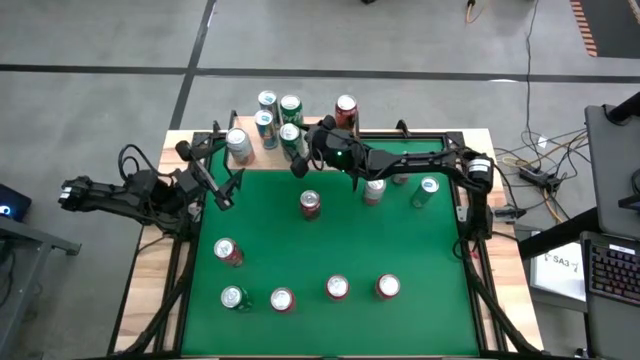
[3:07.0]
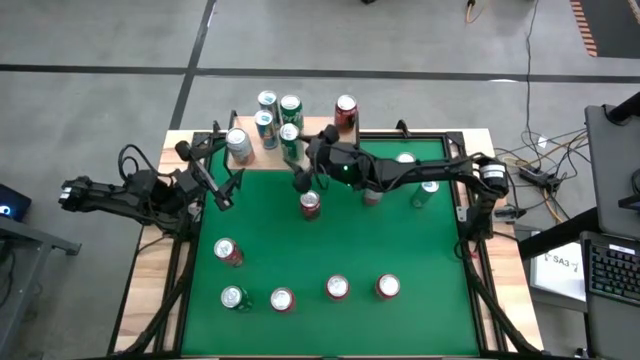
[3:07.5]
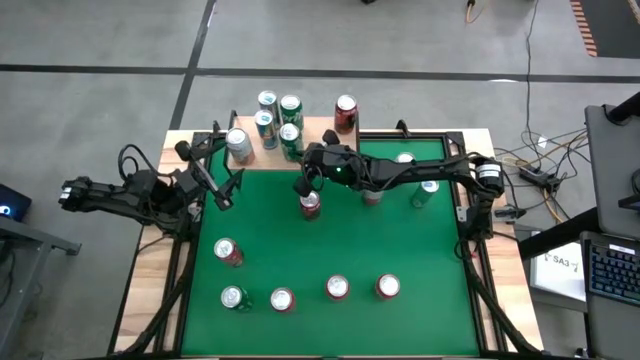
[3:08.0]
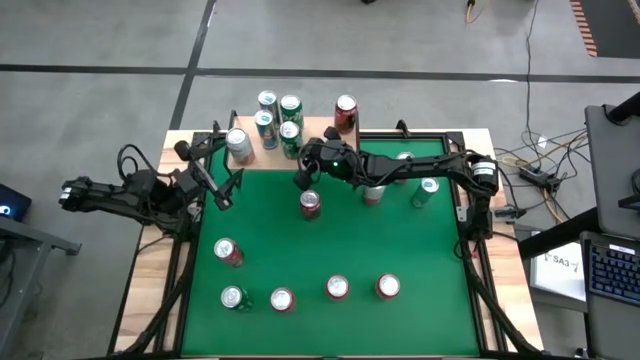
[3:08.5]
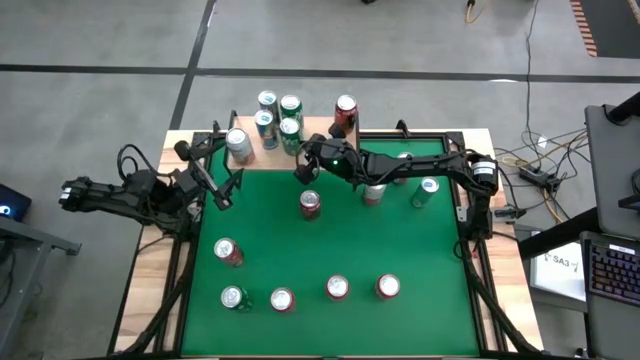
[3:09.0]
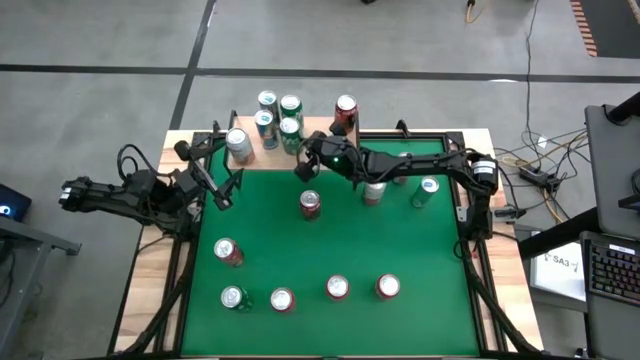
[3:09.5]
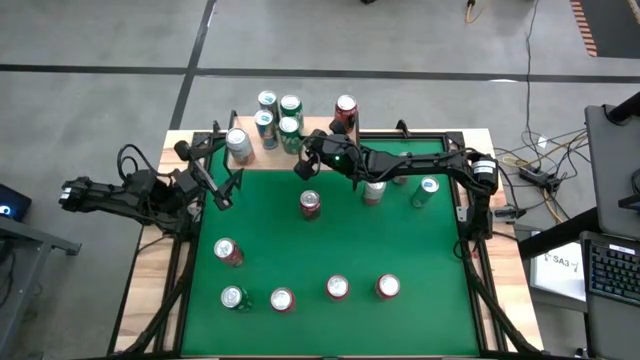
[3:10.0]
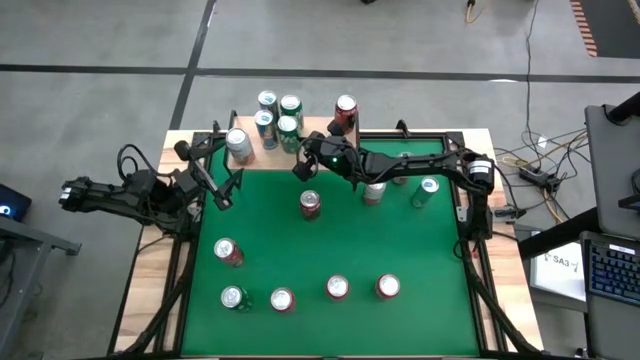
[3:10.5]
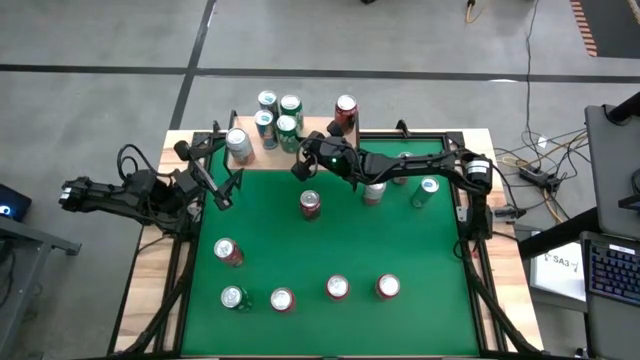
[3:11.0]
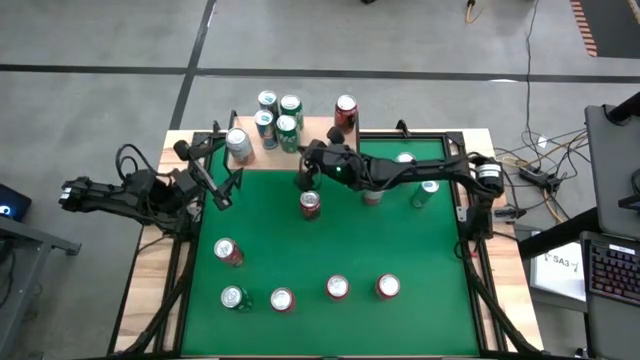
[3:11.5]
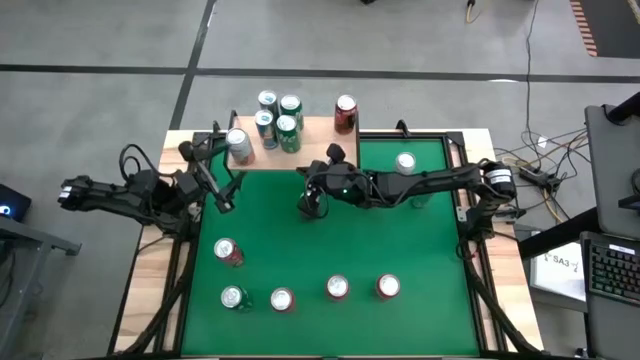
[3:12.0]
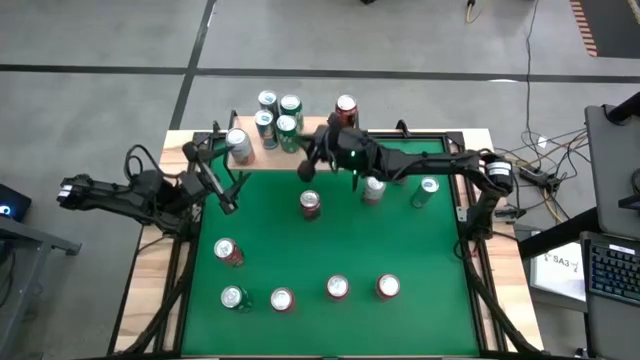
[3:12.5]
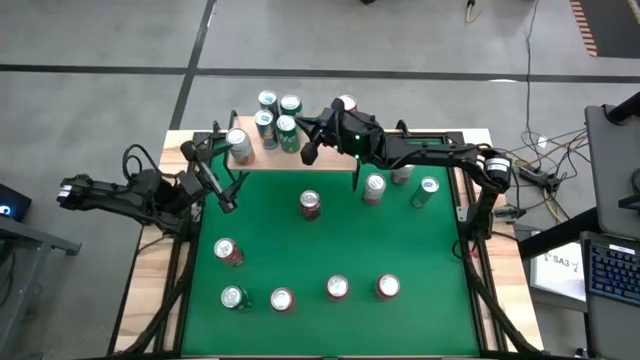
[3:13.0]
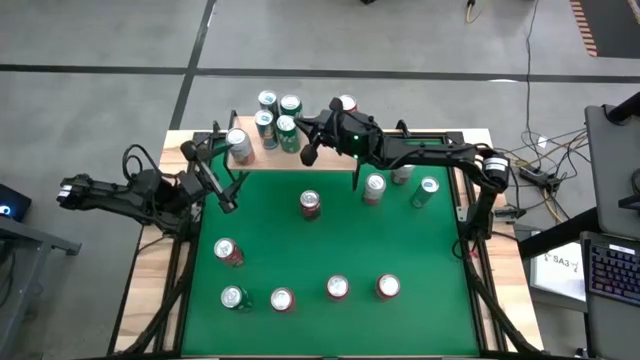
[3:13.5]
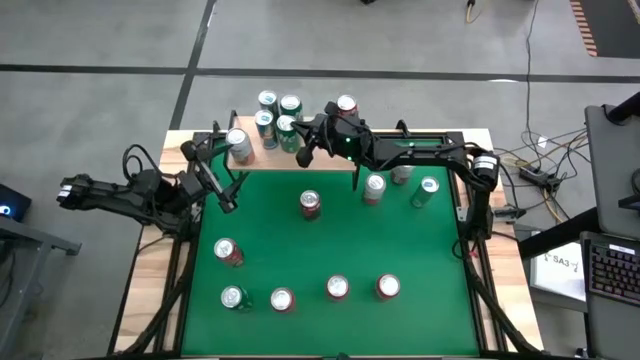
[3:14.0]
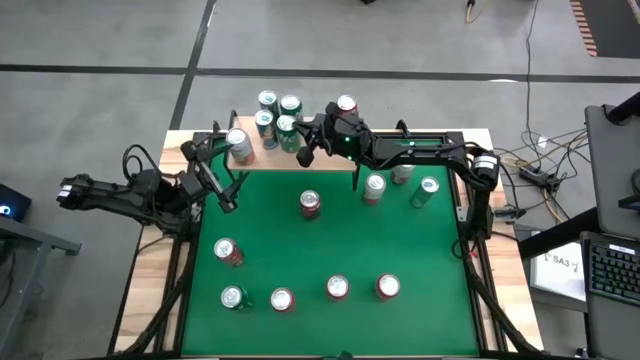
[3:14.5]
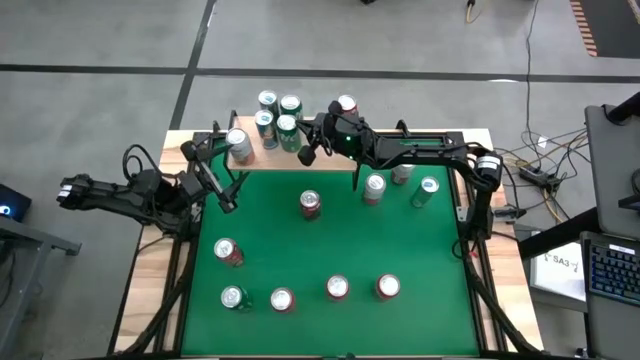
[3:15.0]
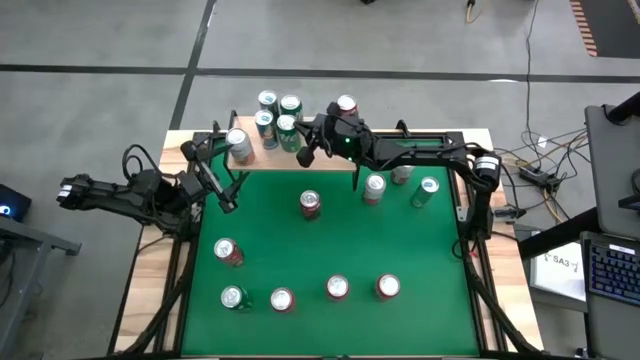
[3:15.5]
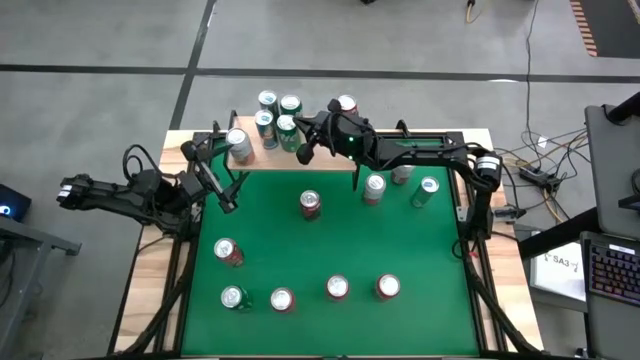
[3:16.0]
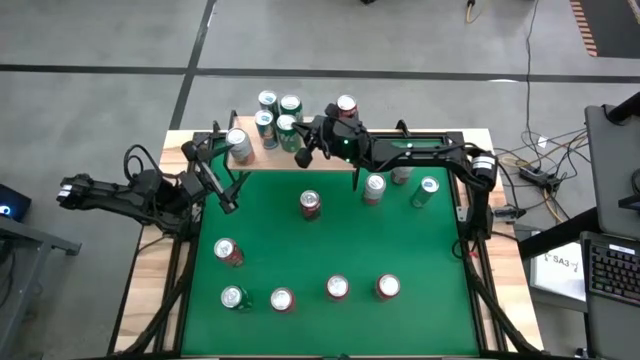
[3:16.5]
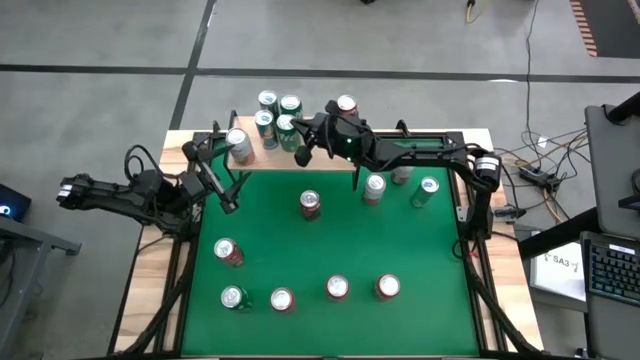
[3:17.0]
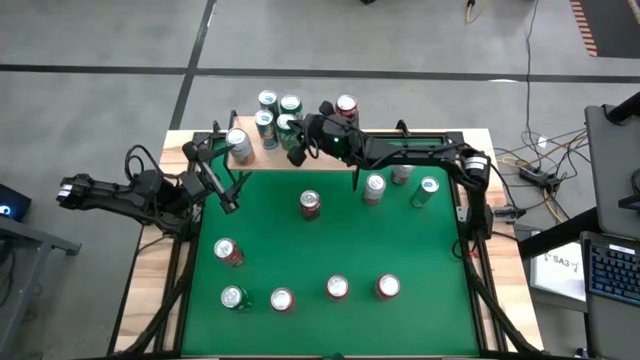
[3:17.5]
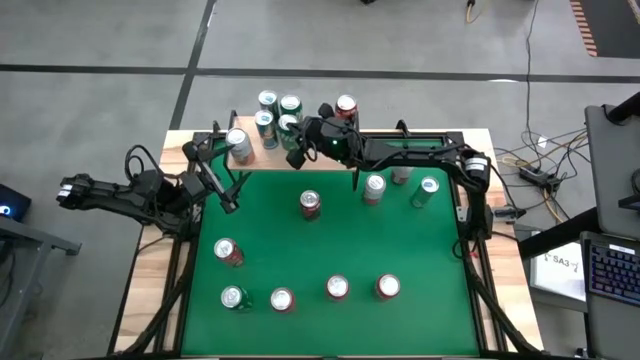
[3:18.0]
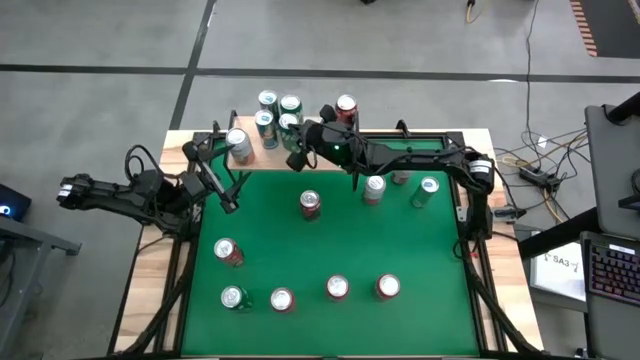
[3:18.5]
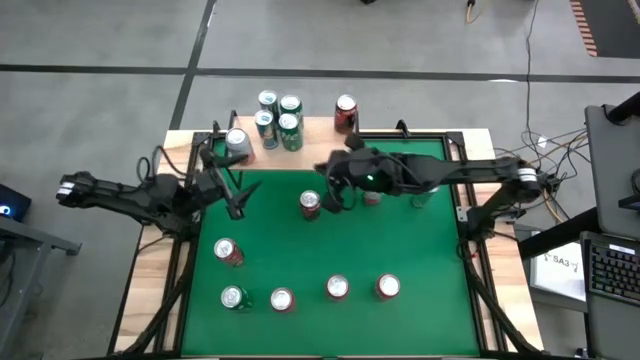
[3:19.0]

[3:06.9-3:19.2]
Task: Place canned beverage on shelf
Put the white and red can on the shelf

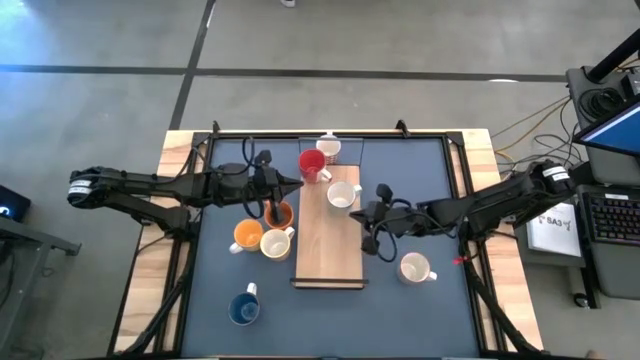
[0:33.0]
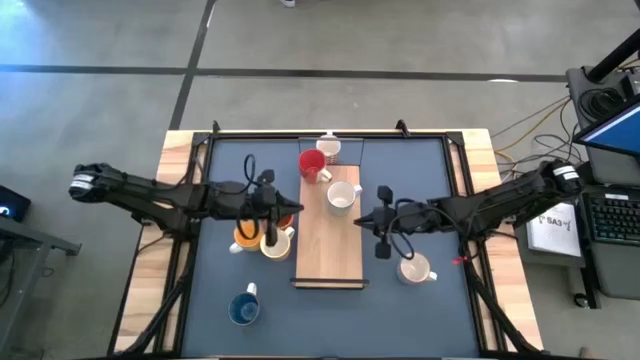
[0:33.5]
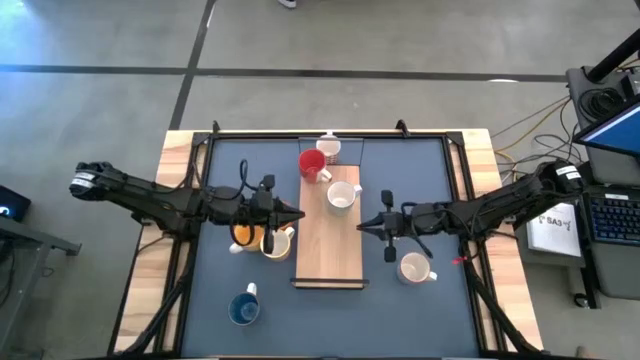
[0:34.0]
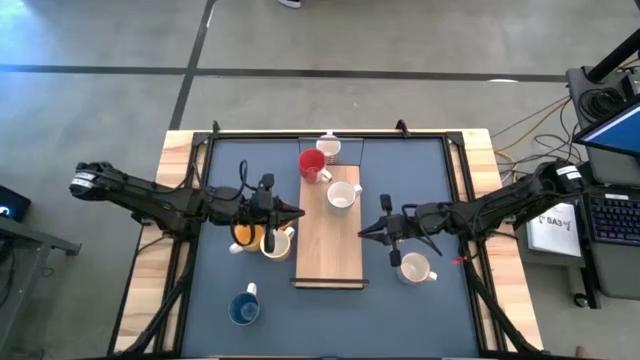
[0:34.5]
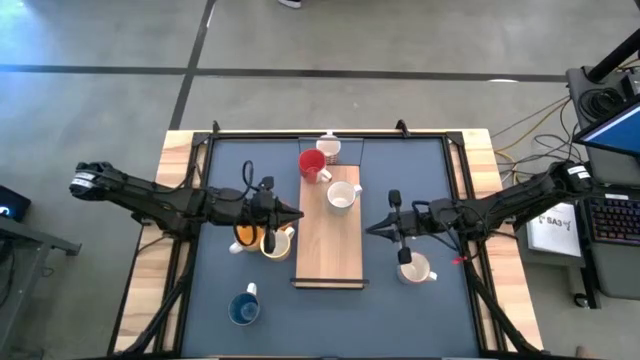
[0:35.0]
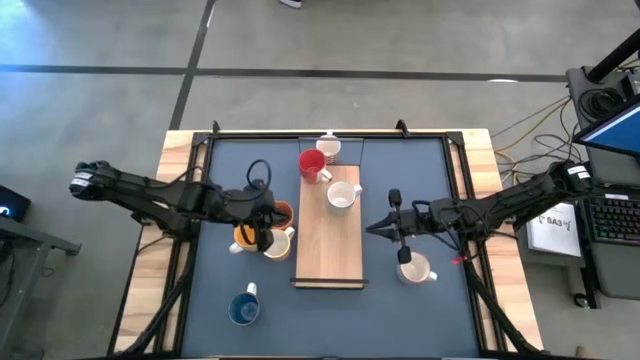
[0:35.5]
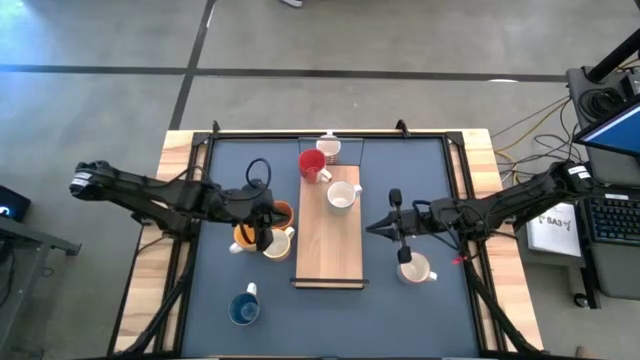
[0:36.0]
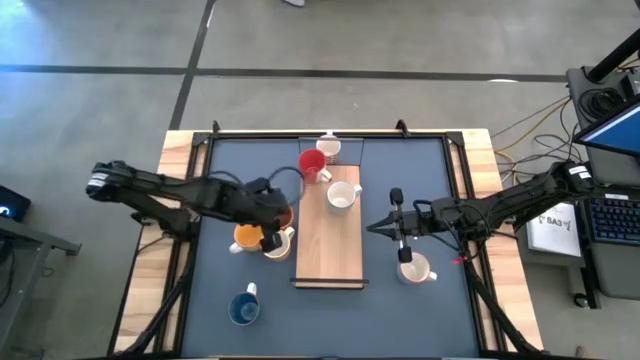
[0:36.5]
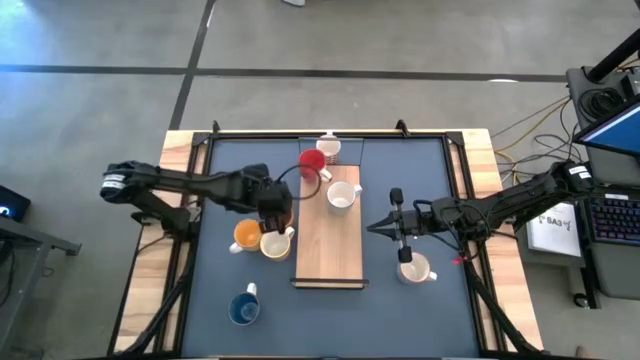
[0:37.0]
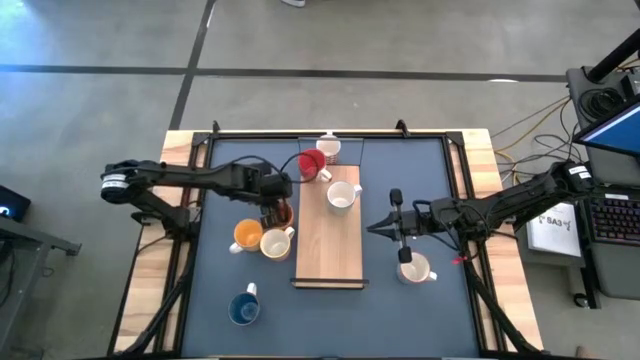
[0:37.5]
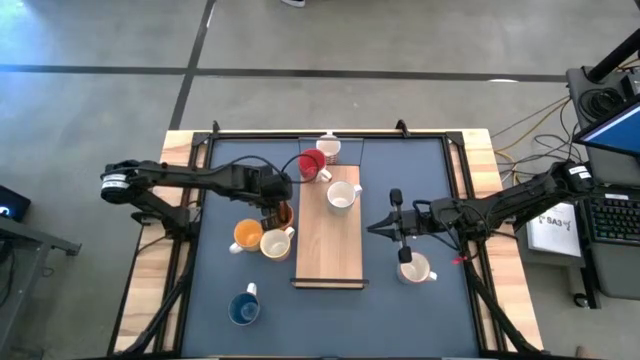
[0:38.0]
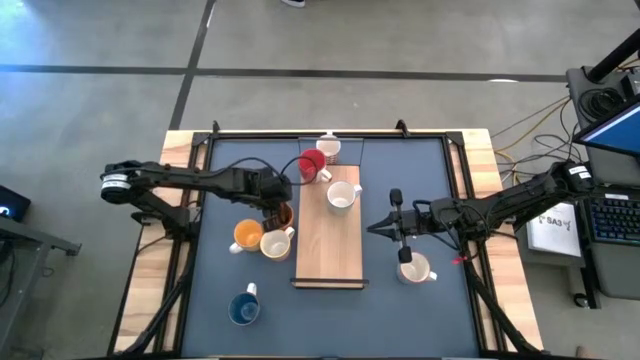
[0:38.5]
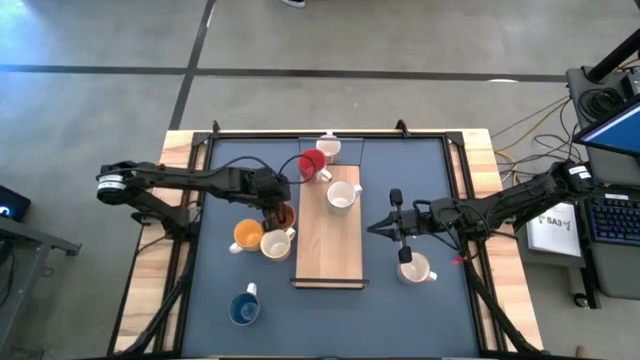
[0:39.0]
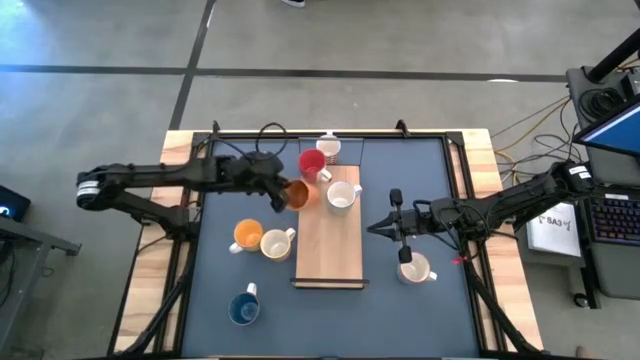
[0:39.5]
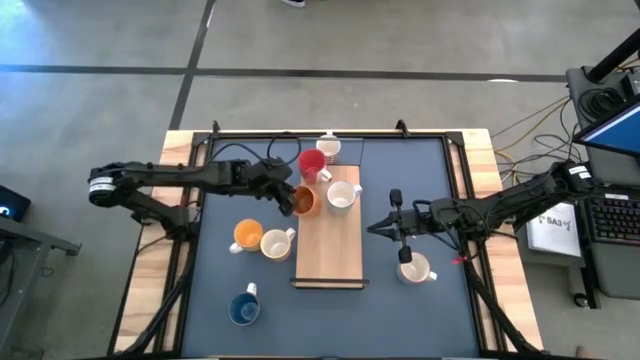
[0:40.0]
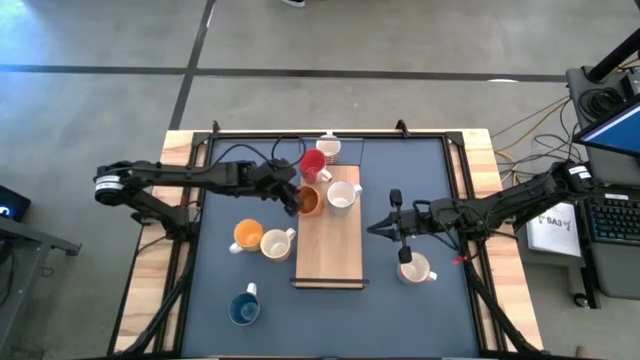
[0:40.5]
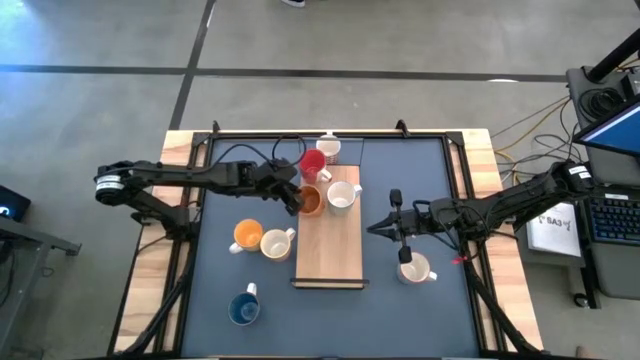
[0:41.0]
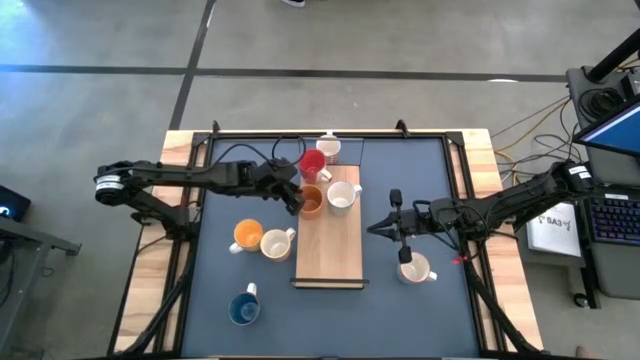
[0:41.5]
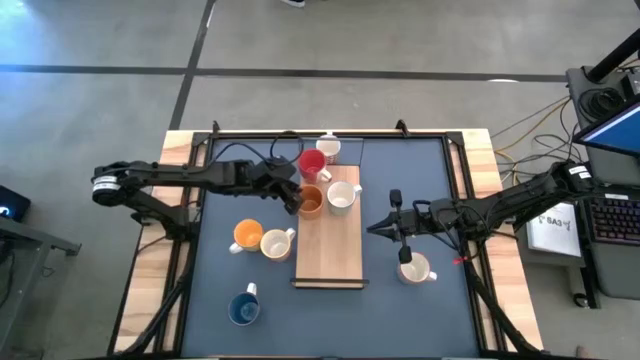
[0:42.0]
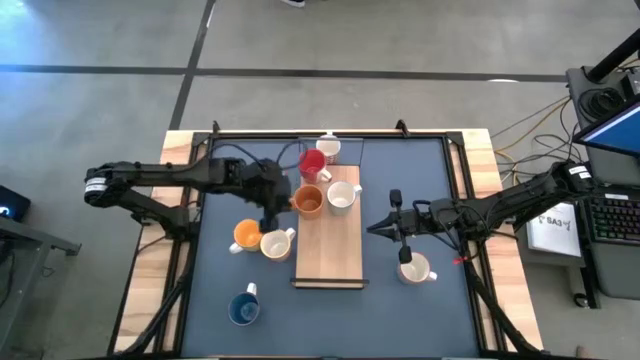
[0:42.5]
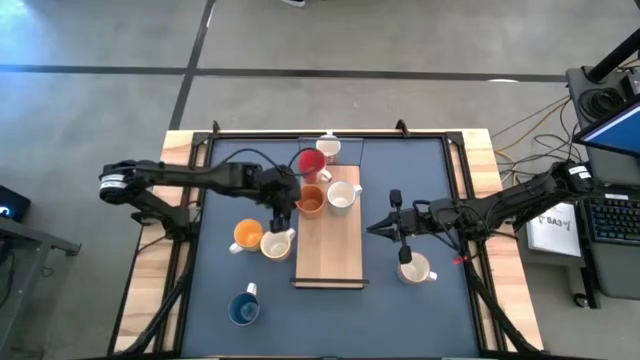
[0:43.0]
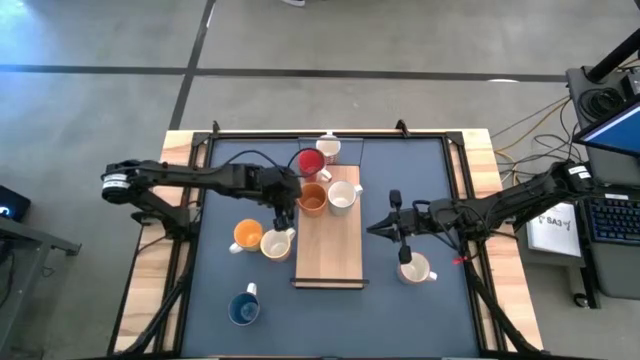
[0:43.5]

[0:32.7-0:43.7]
Task: Place coffee mugs
Put the orange mug on the shelf
